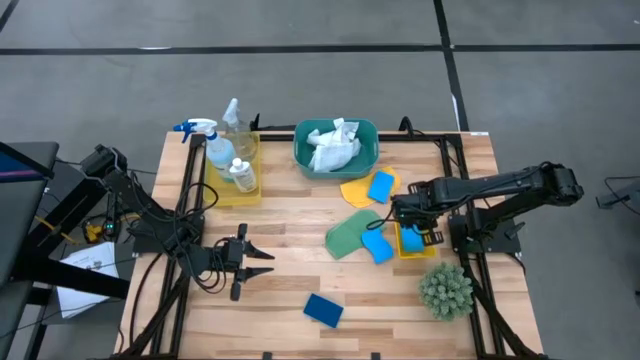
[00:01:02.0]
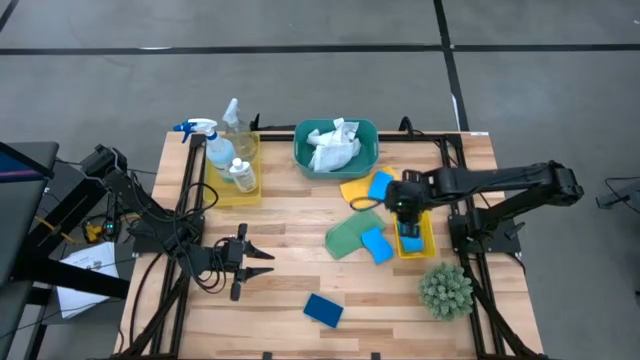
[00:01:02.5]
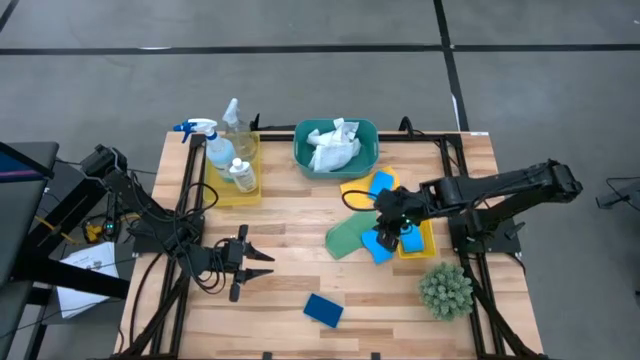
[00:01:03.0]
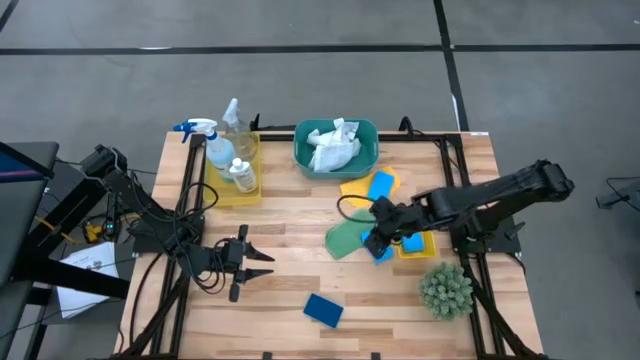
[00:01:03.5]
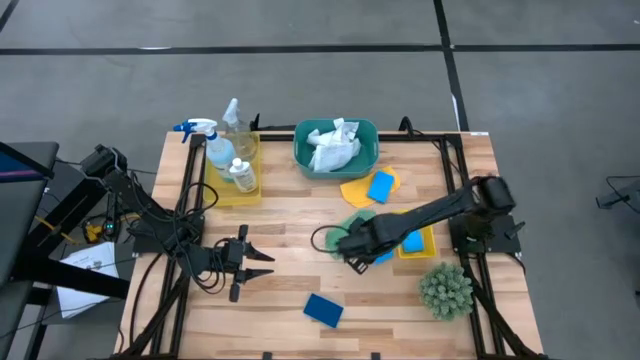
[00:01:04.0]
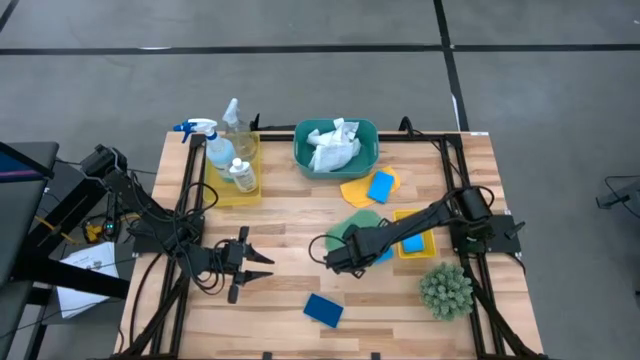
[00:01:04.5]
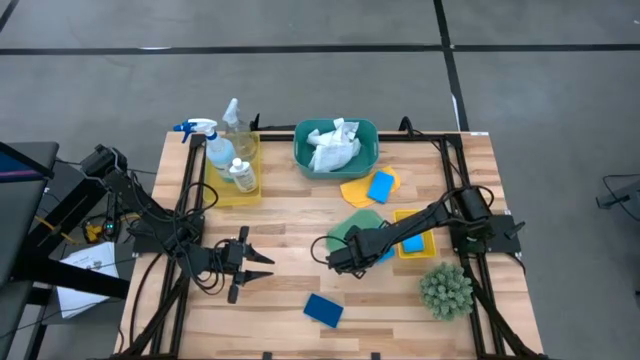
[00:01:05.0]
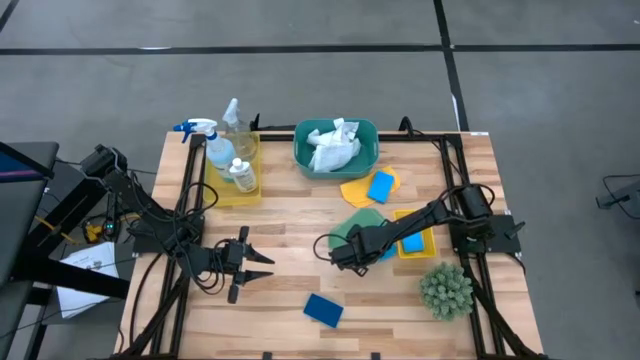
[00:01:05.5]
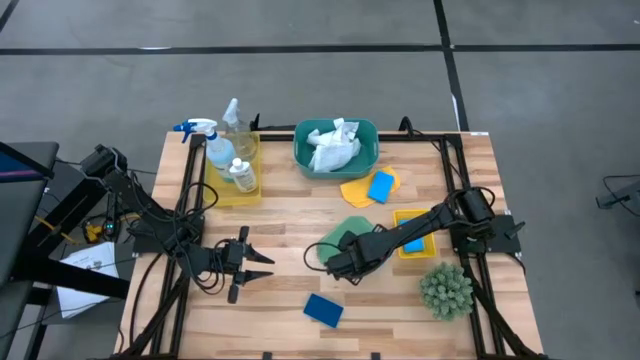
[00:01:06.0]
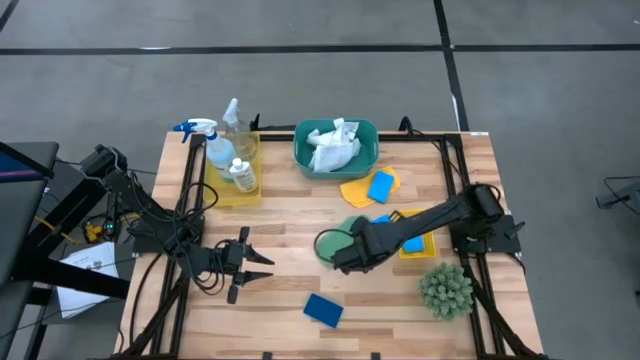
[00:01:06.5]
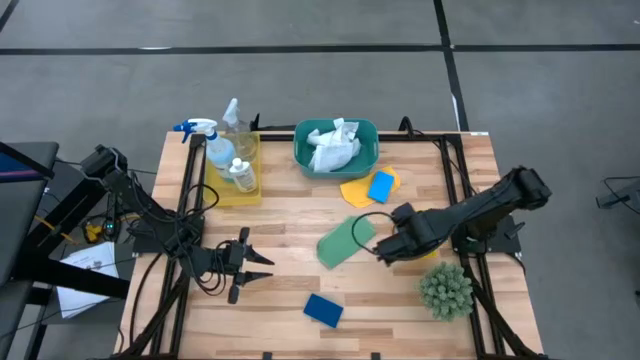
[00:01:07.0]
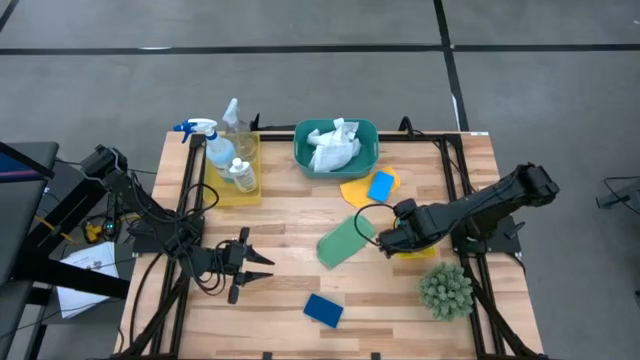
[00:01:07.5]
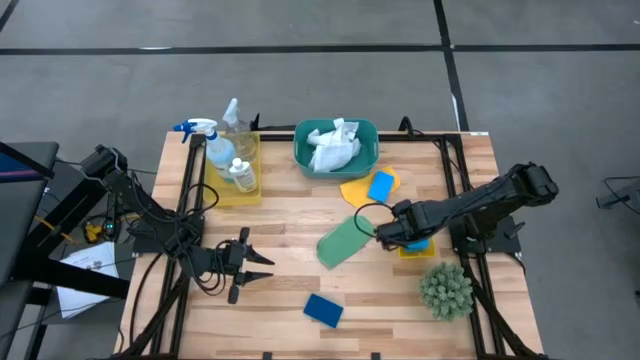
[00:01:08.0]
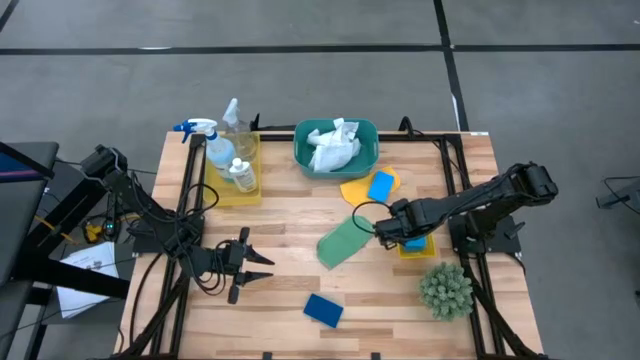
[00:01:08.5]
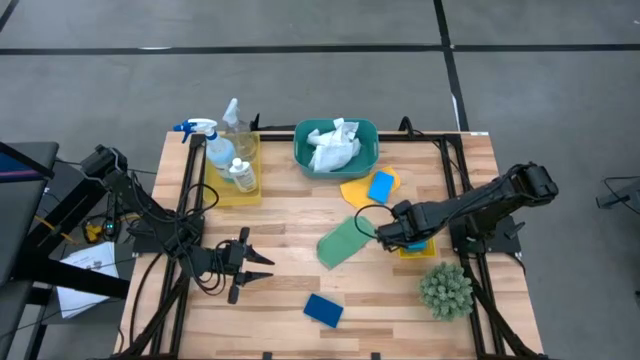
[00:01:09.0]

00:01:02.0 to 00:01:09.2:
Task: Pick & Place Kitchen Items
Put the blue sponge into the right yellow bin

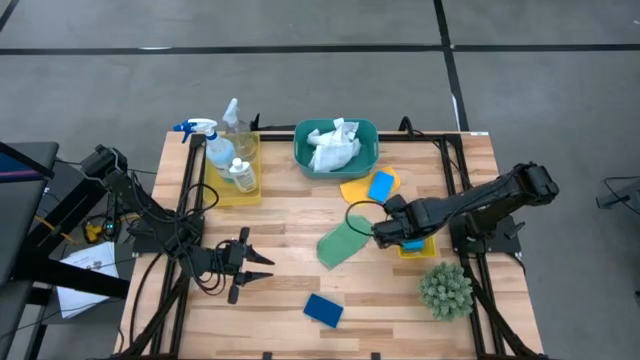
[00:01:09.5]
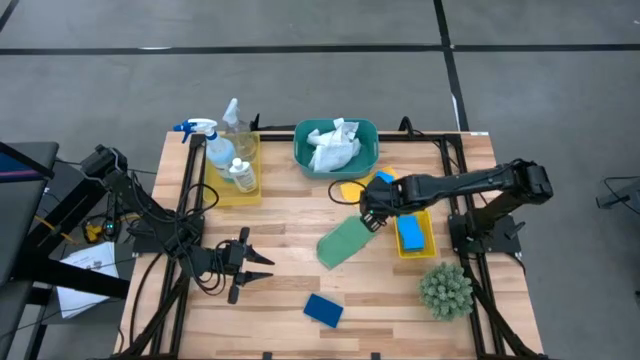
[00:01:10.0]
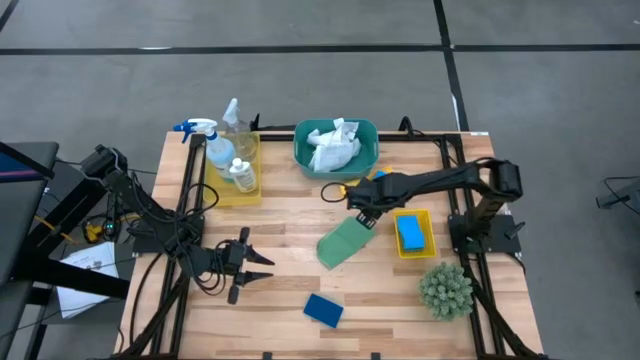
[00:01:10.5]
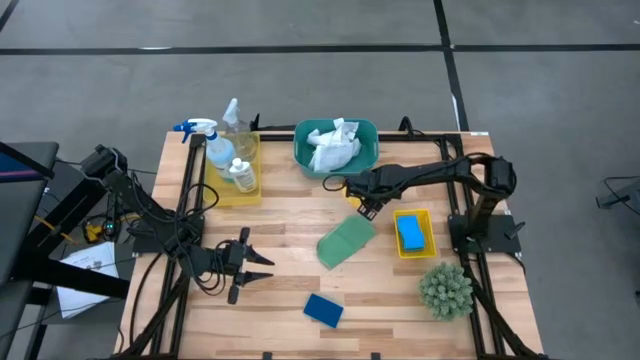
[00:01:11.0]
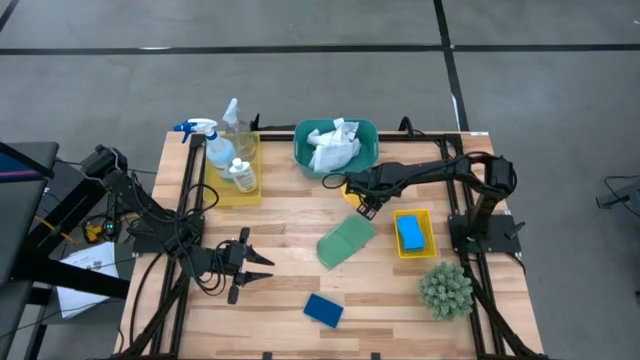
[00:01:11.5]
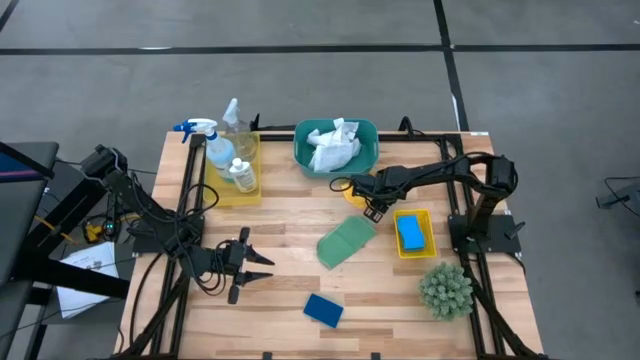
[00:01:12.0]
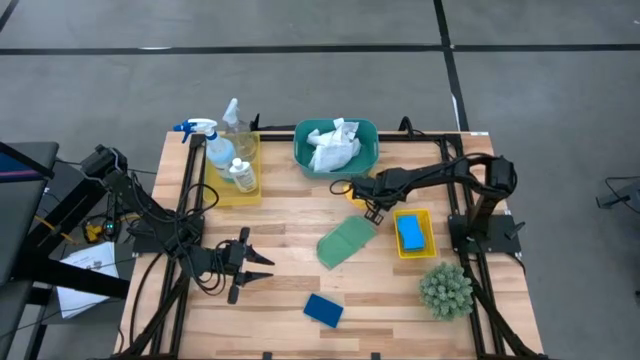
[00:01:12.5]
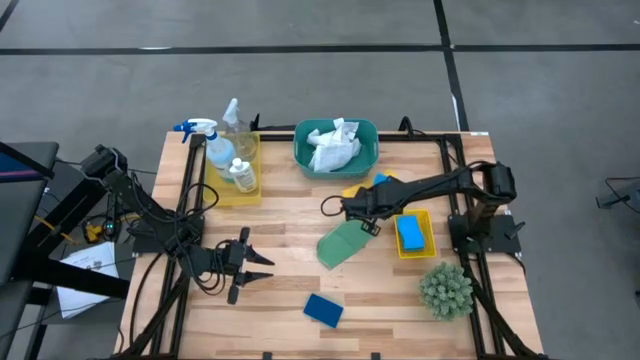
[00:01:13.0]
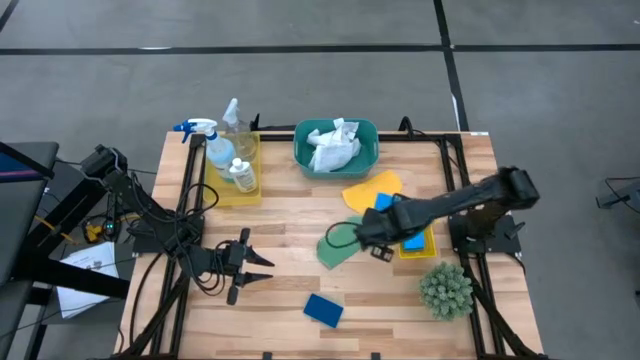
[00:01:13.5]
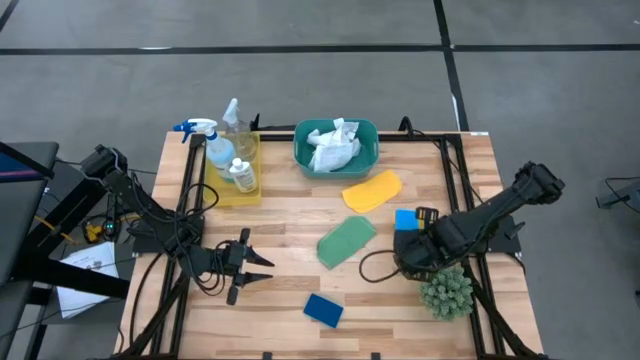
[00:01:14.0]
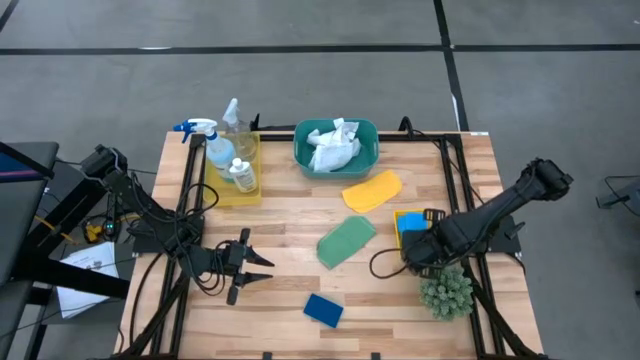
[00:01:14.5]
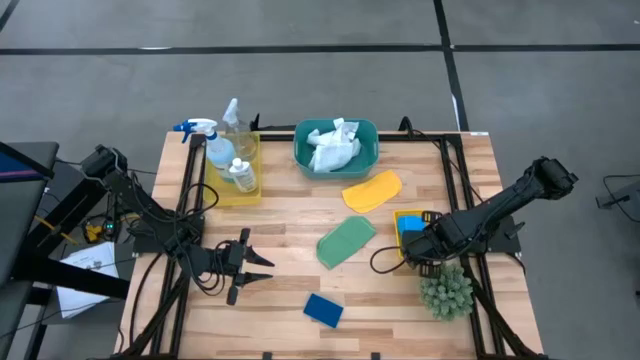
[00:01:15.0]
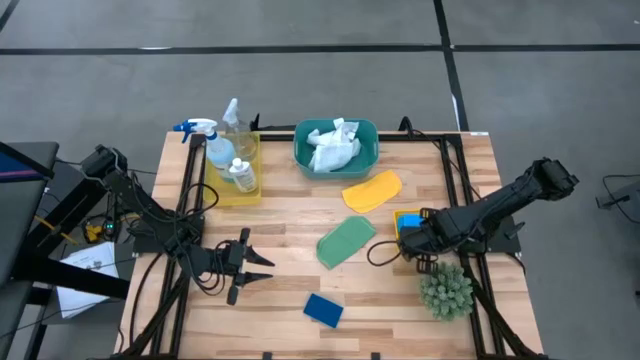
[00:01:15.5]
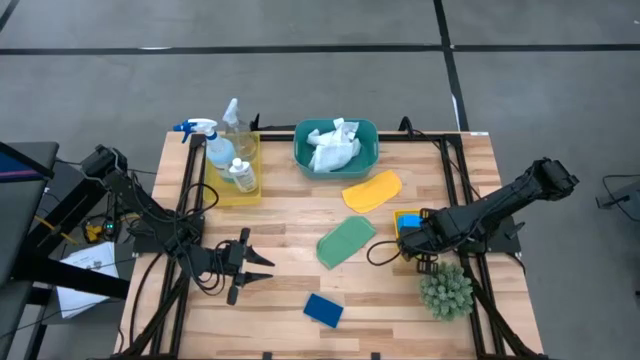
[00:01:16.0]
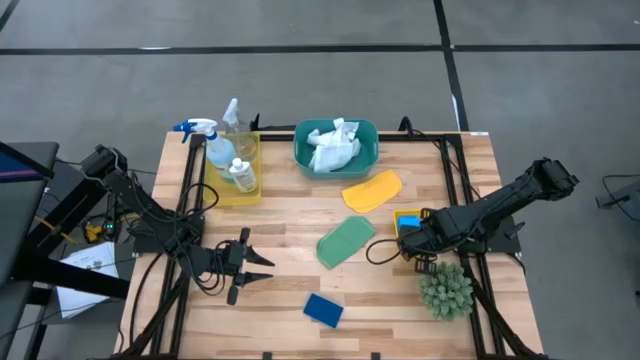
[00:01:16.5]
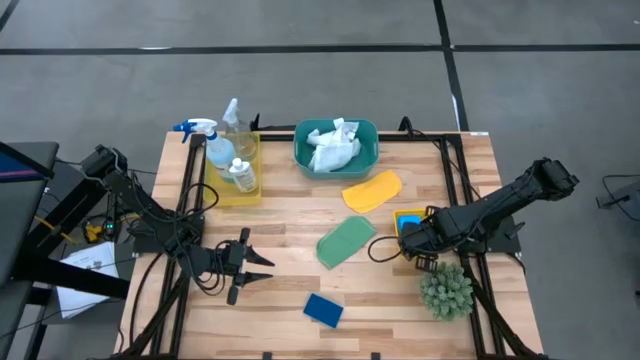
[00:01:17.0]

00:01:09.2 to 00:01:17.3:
Put the blue sponge into the right yellow bin

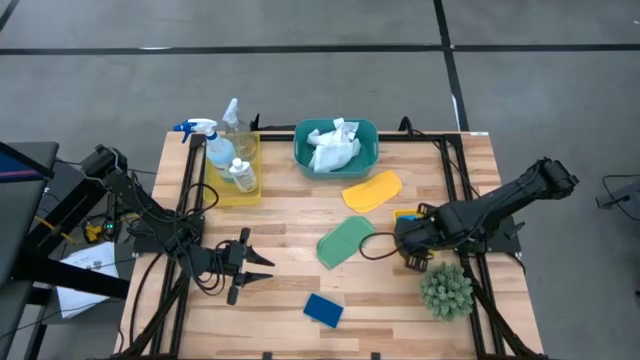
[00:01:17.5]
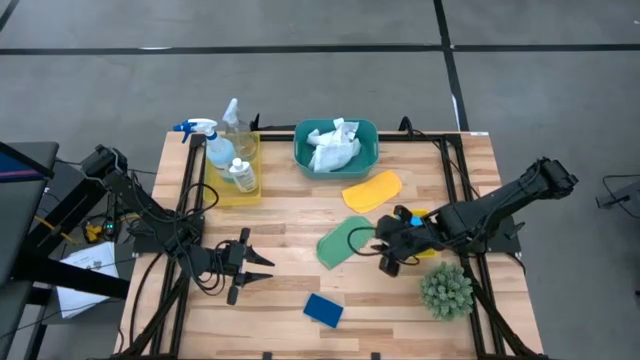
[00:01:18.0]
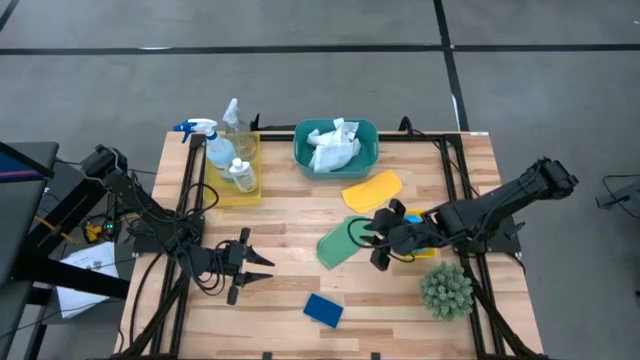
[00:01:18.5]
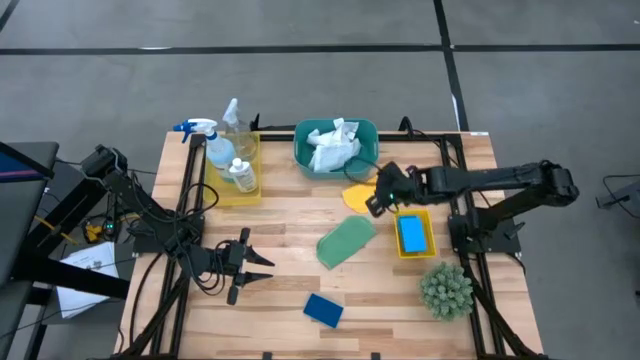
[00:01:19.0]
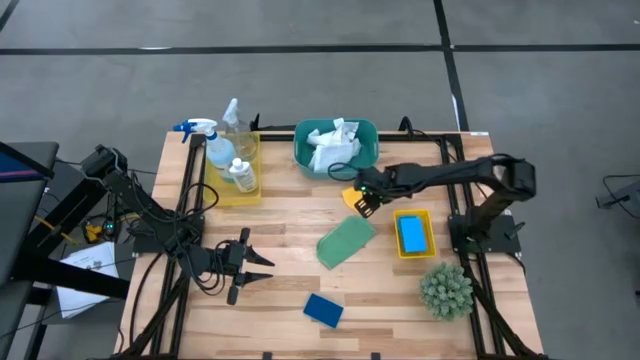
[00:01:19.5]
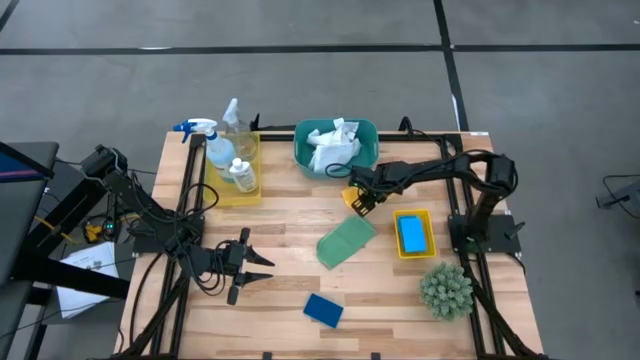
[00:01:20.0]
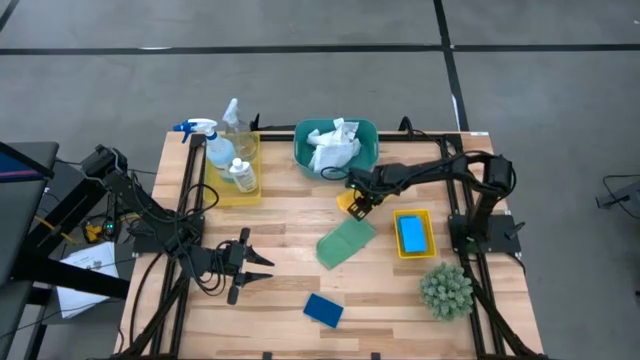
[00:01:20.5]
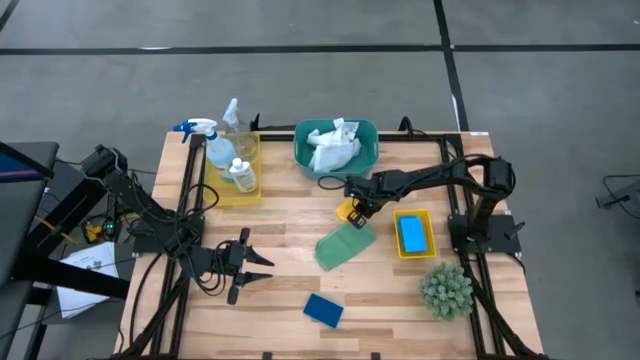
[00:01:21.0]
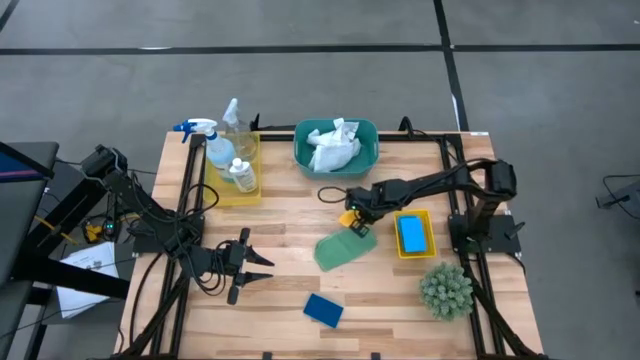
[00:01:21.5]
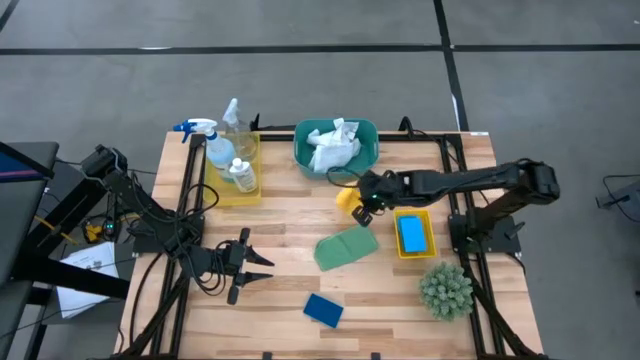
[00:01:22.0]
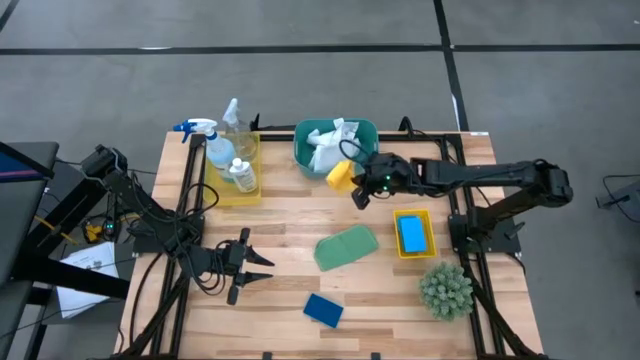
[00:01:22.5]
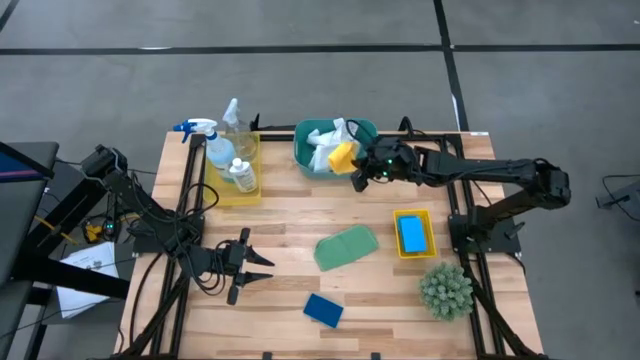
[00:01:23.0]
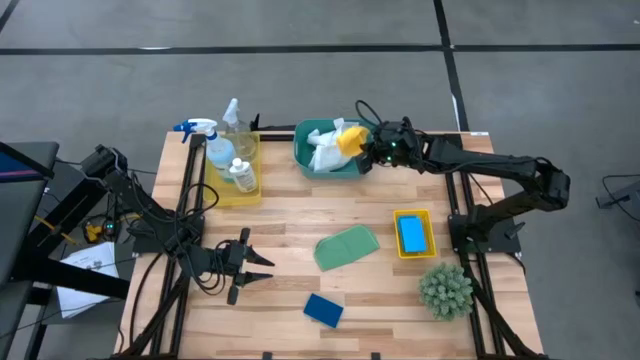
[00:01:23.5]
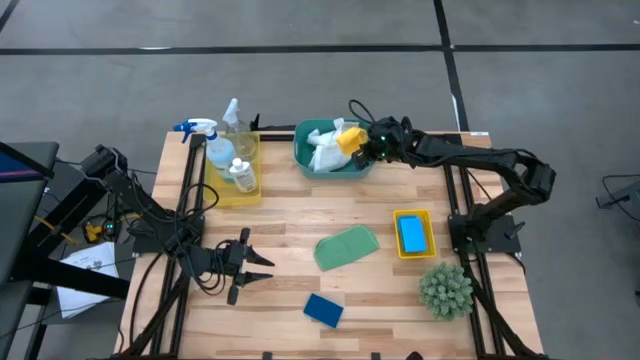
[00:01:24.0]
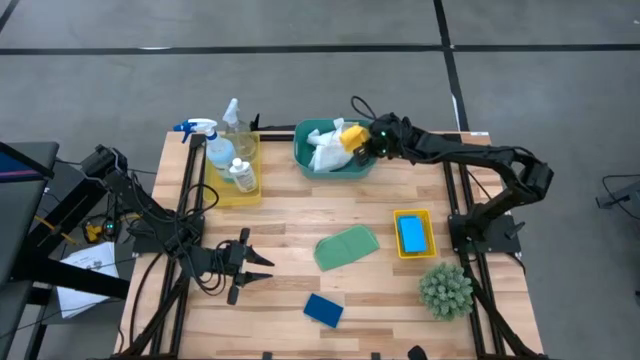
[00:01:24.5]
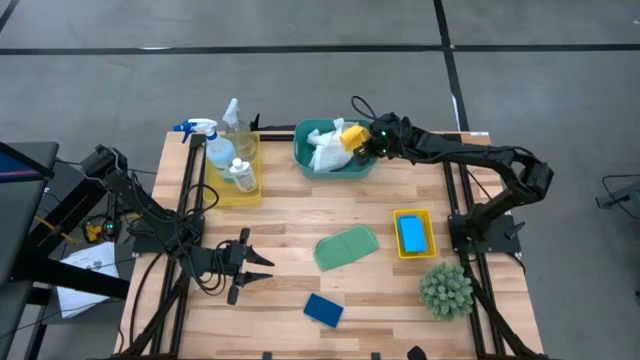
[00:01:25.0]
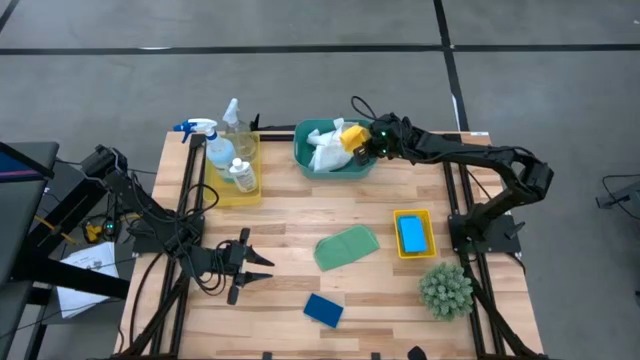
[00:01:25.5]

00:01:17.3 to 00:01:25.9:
Put the yellow cleaning cloth into the green bin
